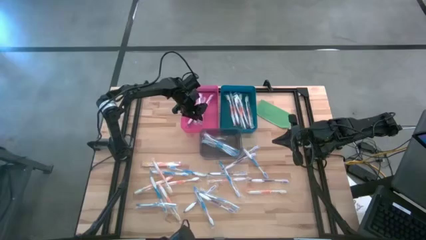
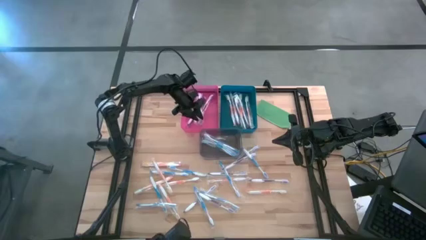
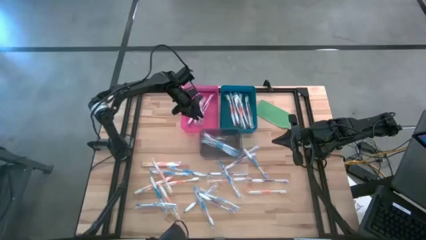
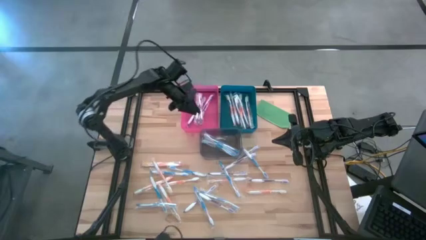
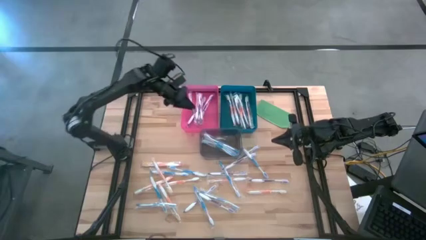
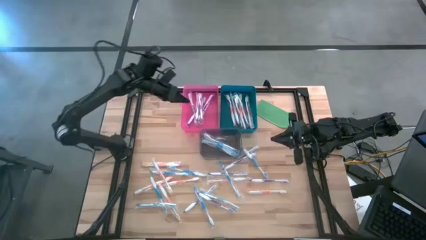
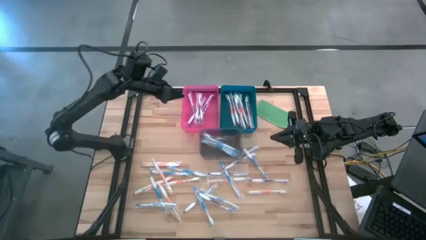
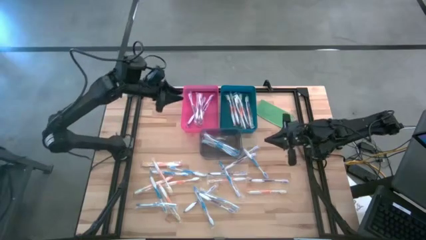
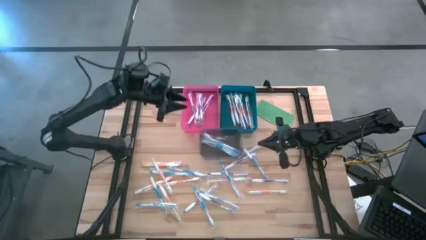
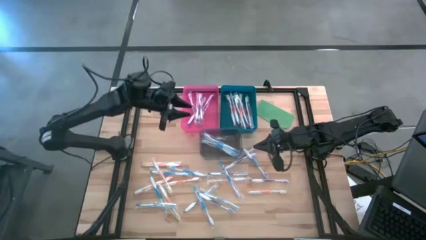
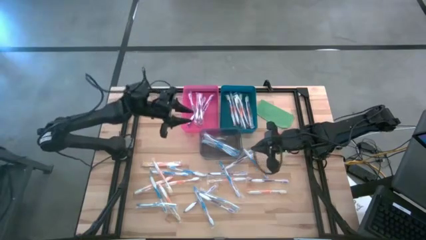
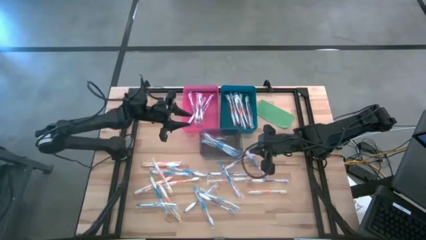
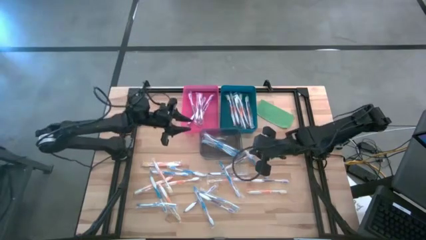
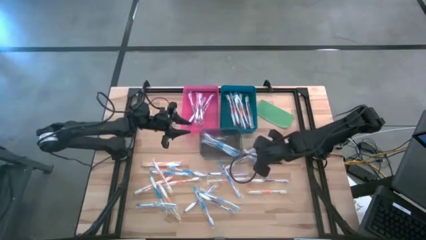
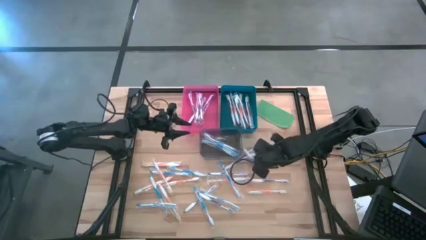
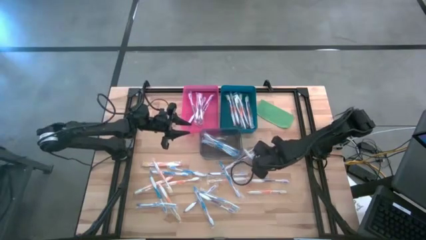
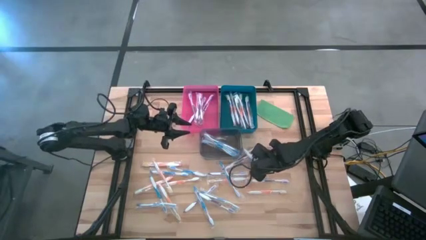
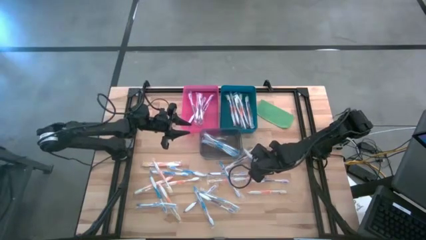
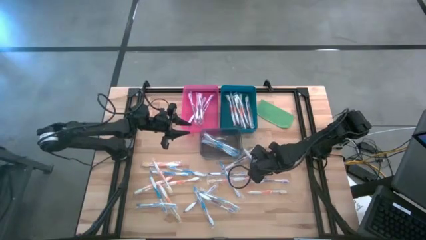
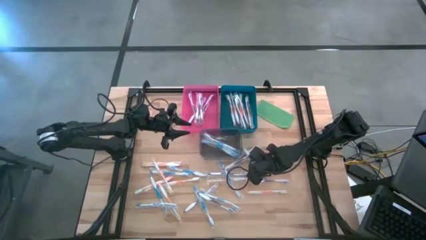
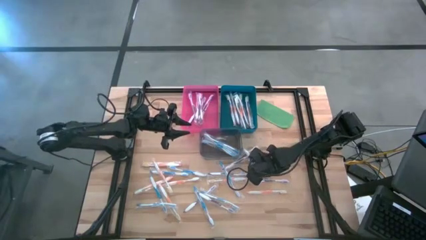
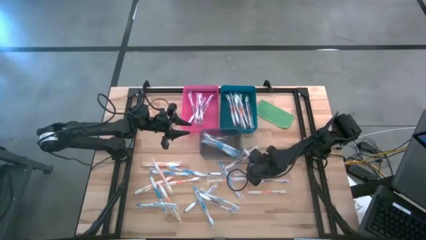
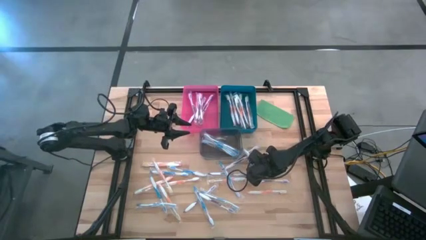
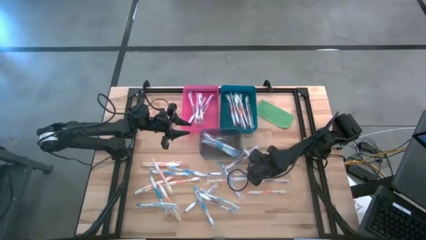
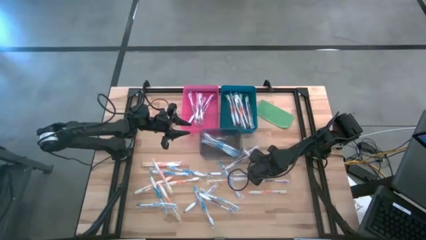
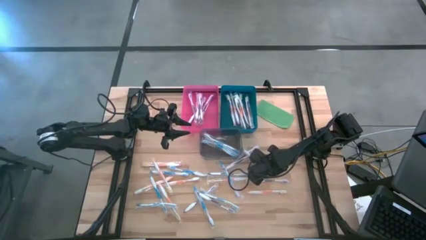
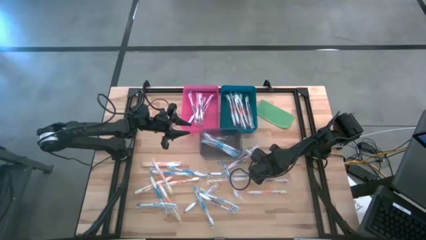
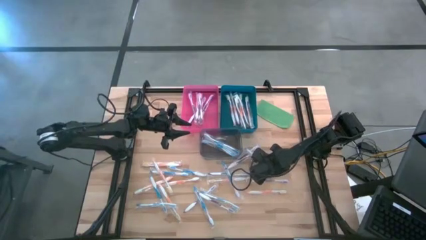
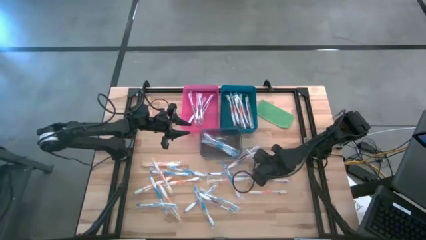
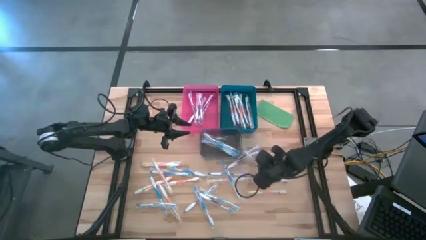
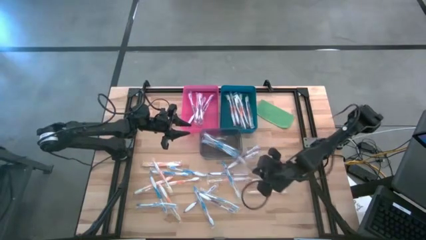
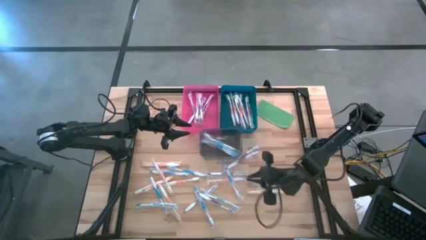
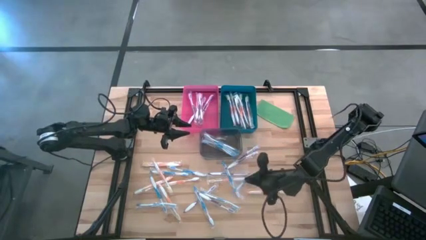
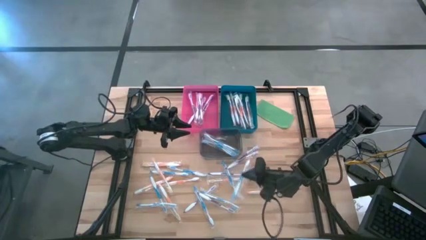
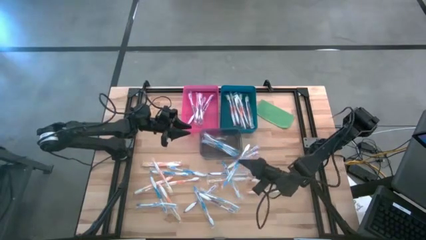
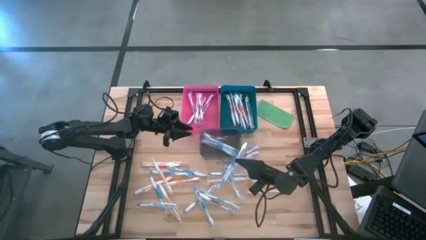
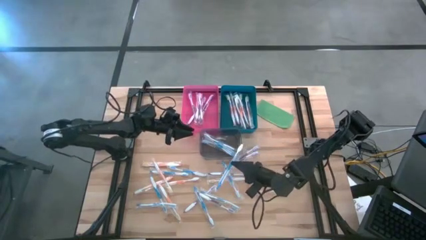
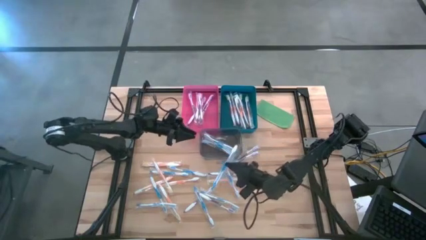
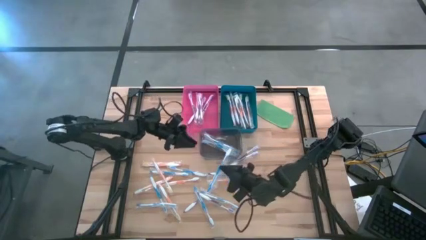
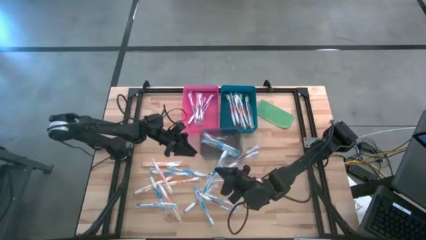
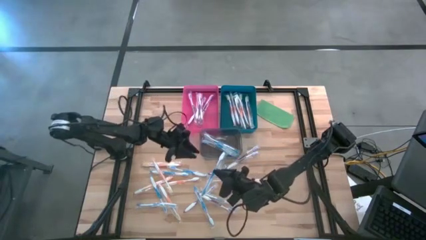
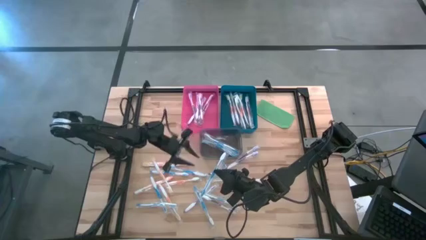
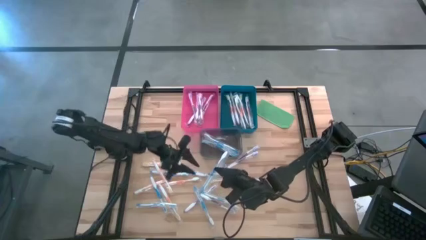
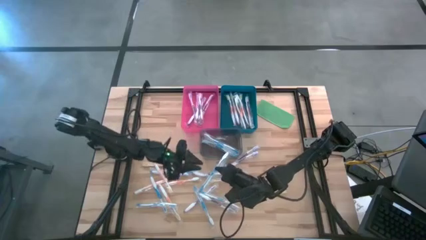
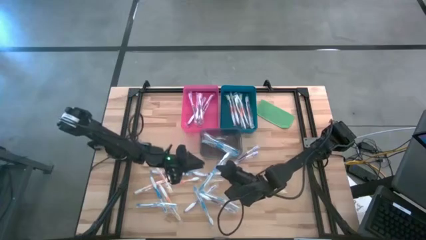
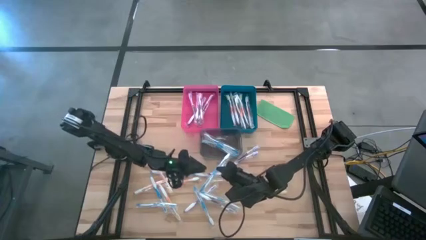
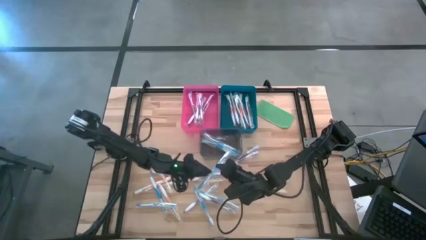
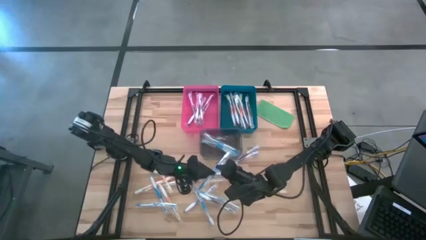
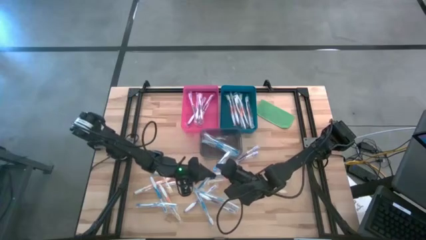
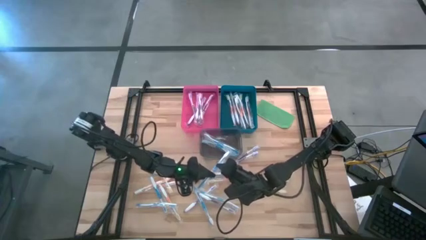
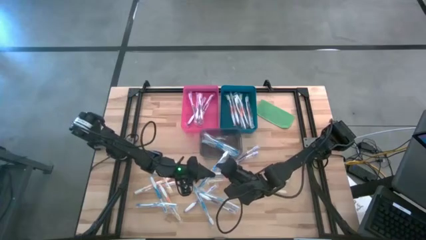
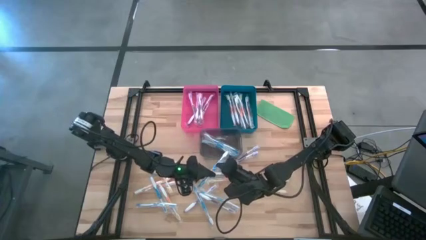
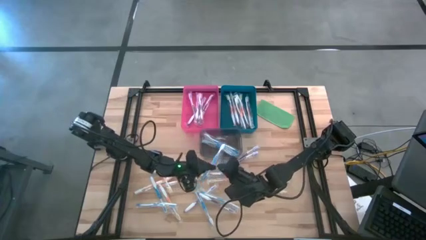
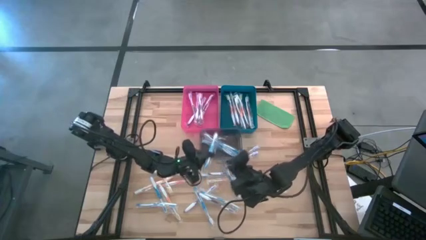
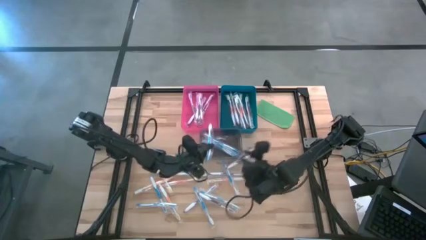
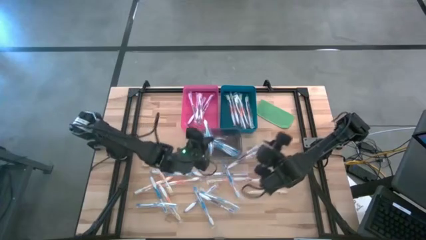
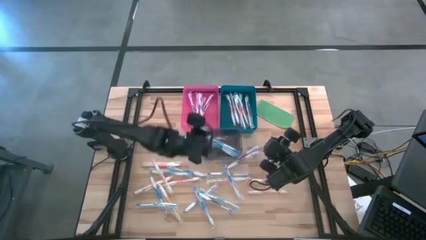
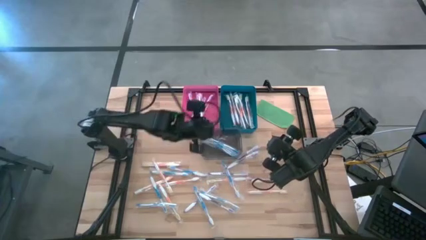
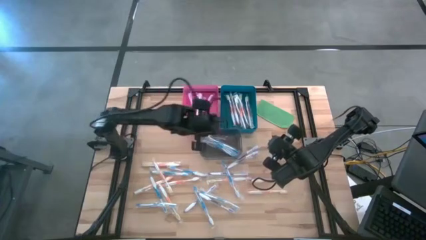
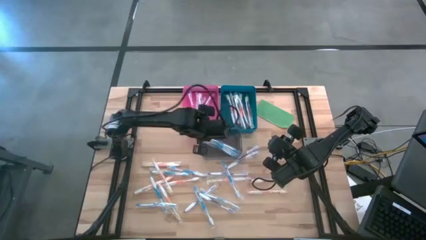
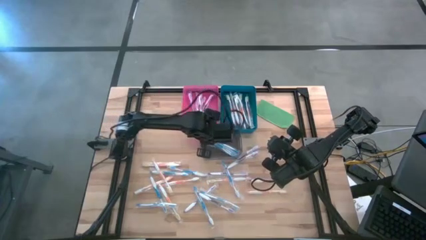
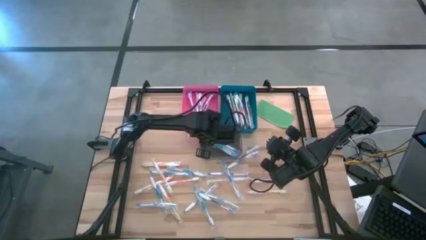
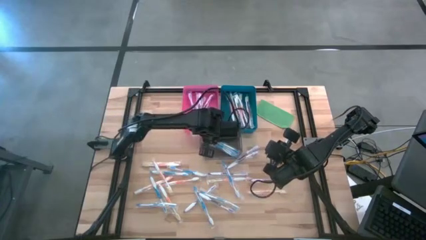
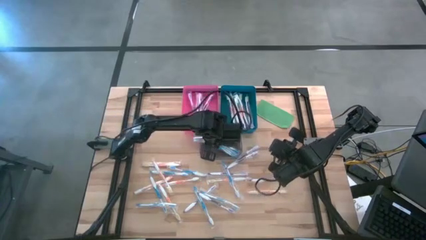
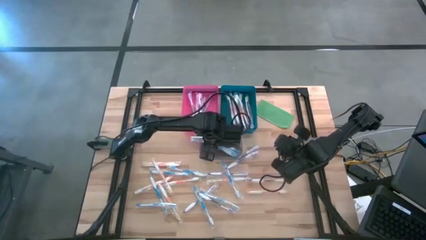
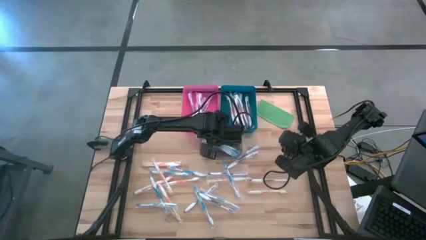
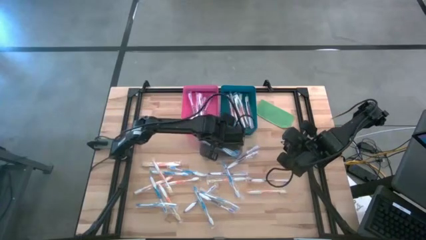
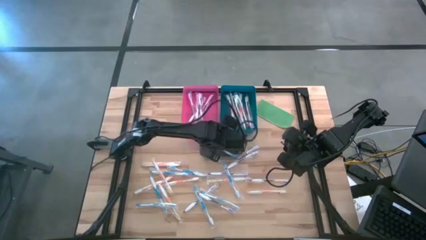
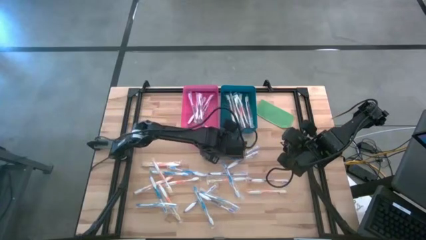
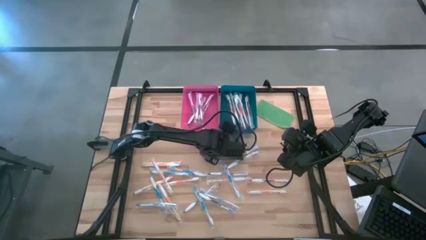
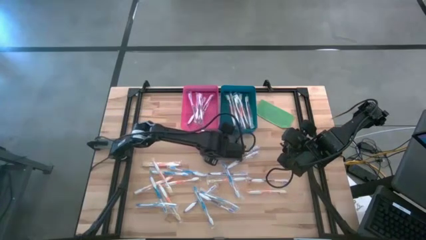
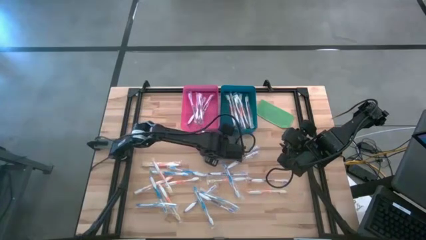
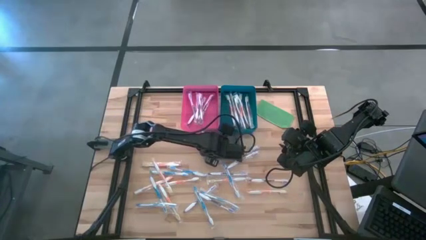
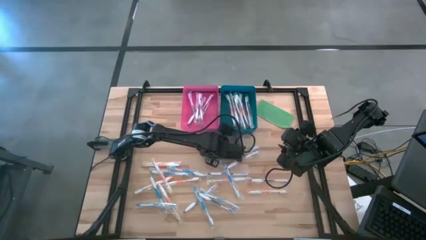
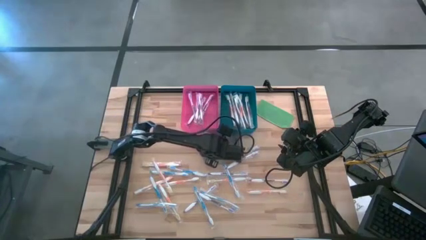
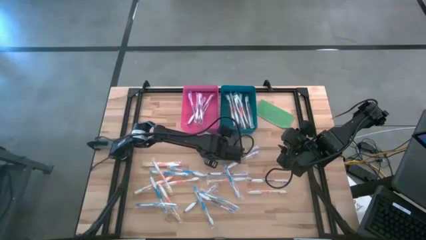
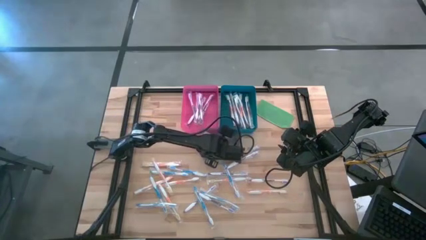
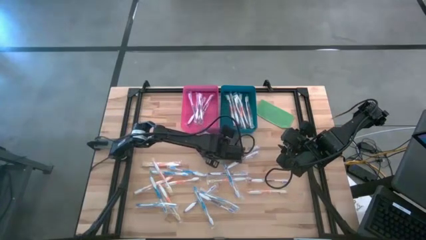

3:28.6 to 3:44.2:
Task: Pick & Place Toothbrushes
Put the blue toothbrush into the transparent gray bin

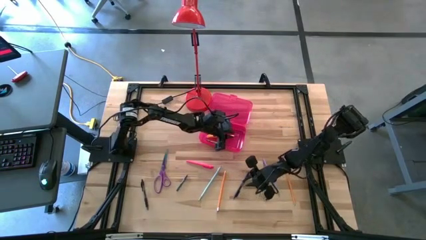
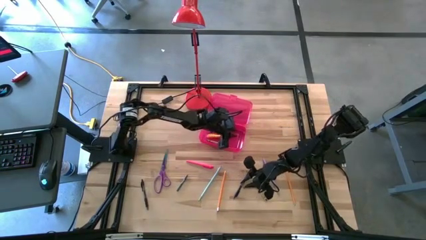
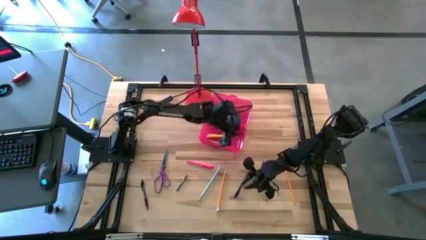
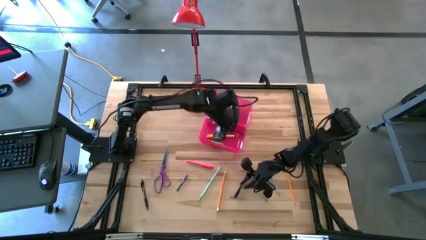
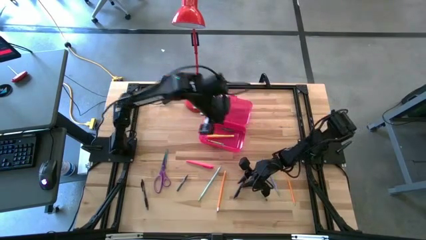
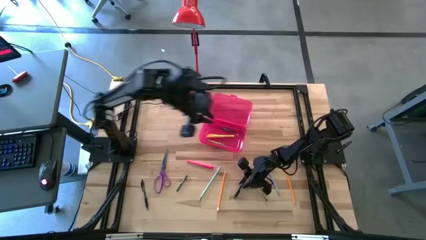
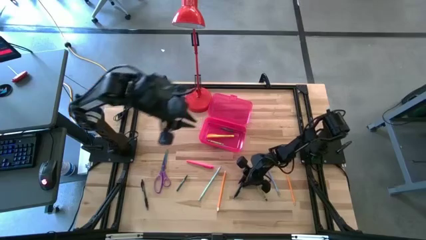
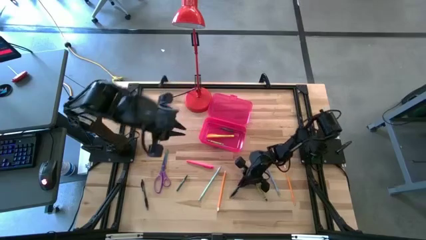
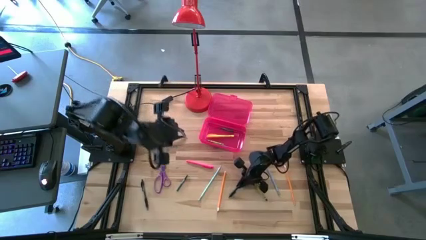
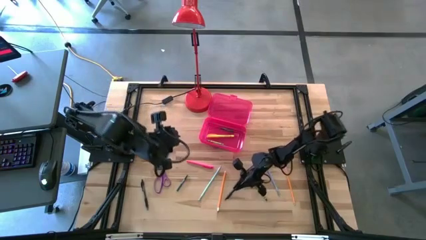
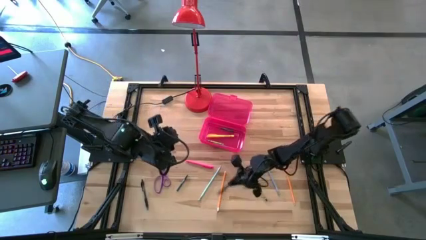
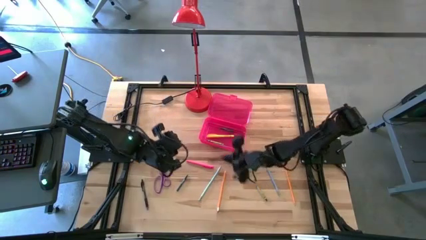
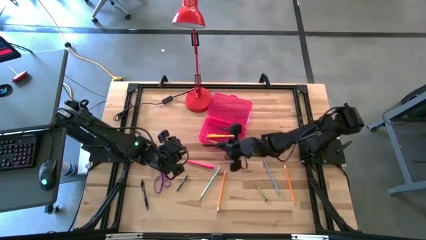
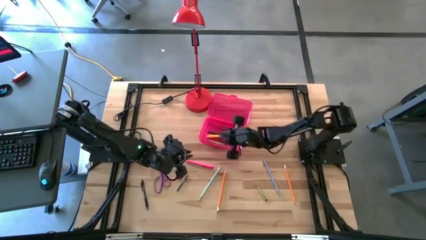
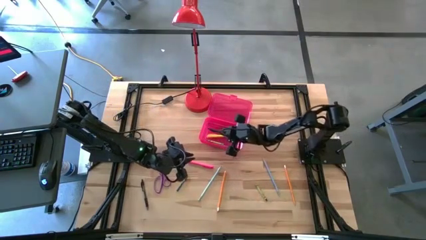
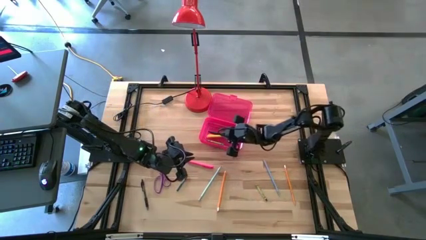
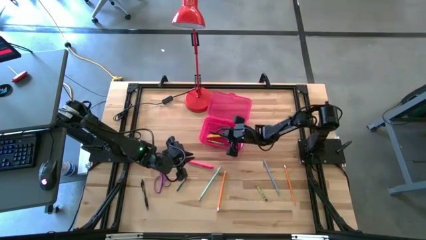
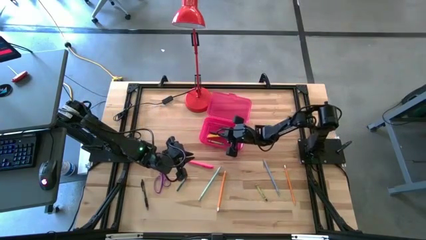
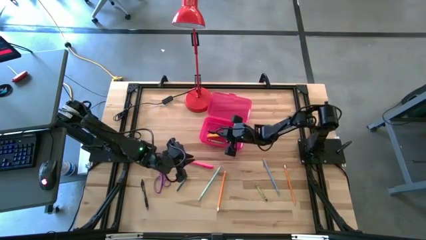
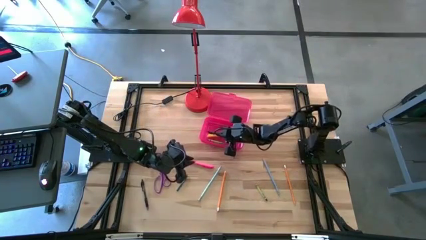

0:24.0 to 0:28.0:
Task: Pick & place school supplies into a supply box
Put the black pen into the pink supply box
